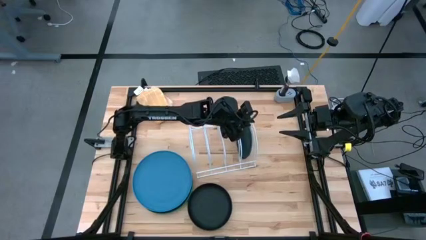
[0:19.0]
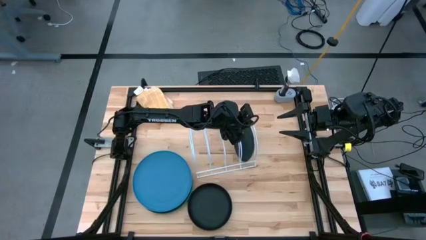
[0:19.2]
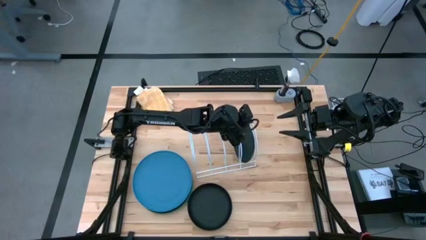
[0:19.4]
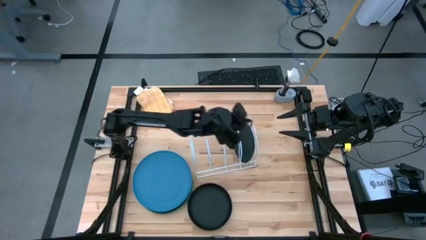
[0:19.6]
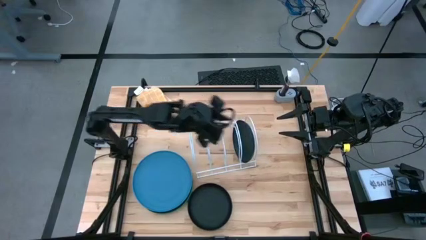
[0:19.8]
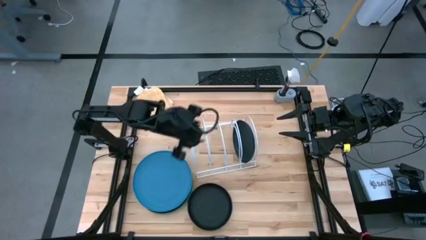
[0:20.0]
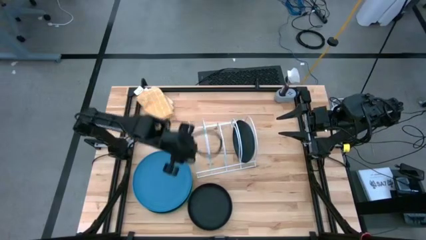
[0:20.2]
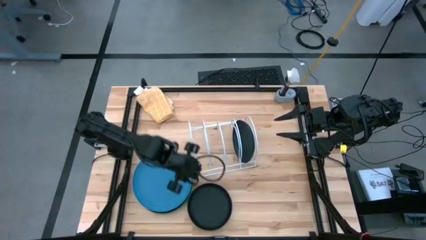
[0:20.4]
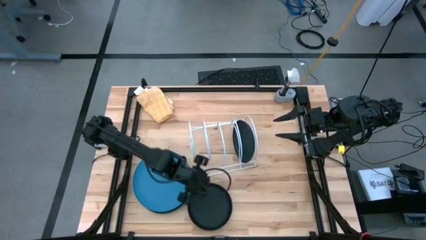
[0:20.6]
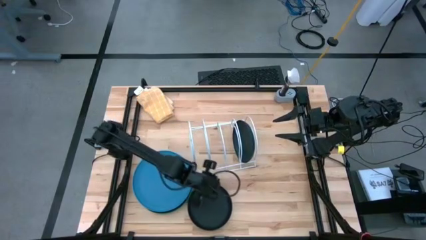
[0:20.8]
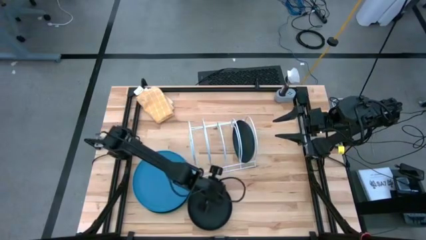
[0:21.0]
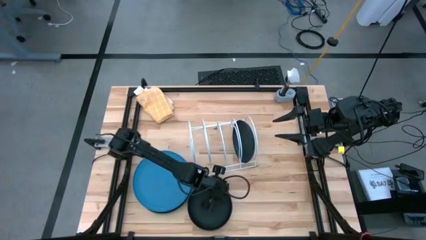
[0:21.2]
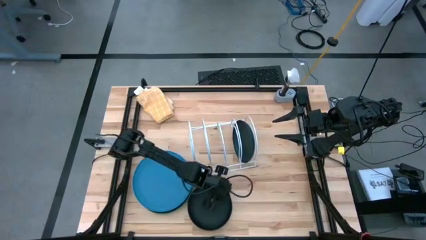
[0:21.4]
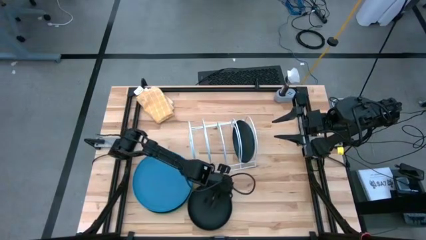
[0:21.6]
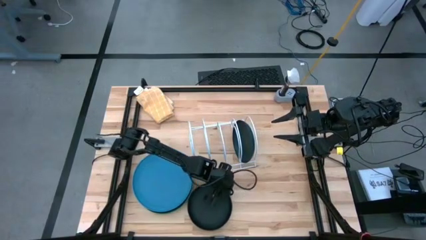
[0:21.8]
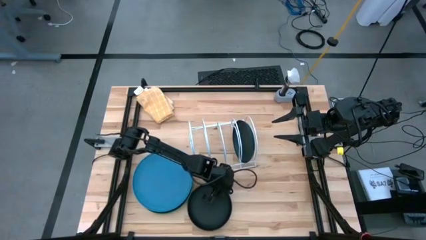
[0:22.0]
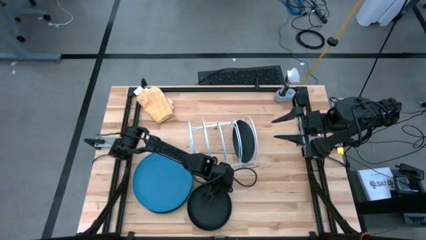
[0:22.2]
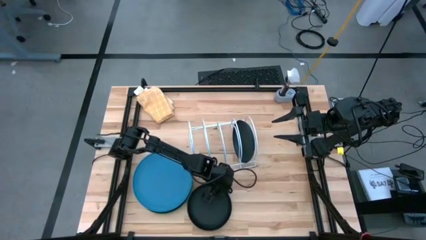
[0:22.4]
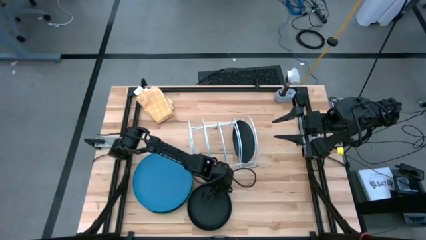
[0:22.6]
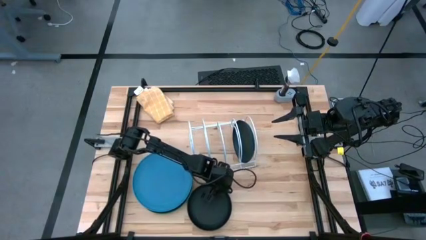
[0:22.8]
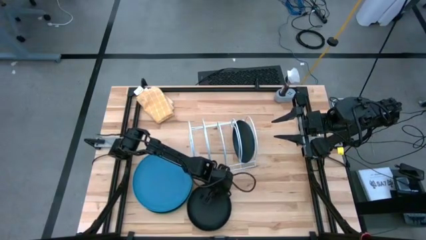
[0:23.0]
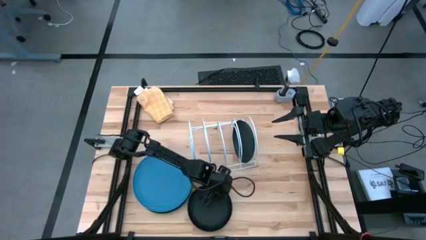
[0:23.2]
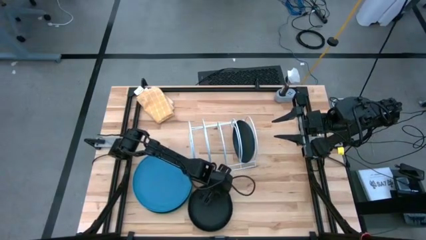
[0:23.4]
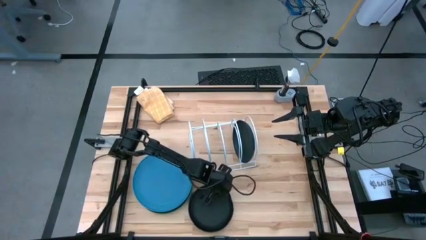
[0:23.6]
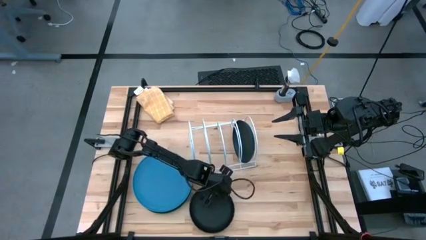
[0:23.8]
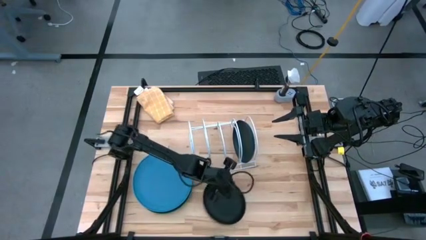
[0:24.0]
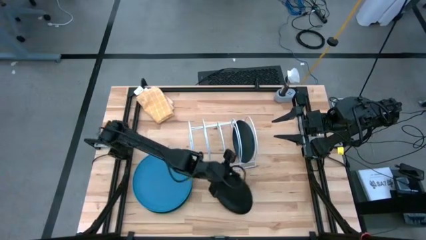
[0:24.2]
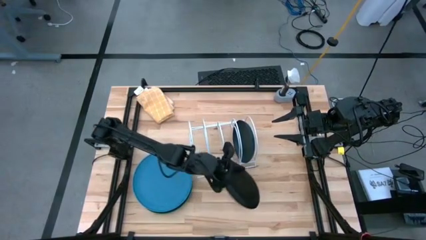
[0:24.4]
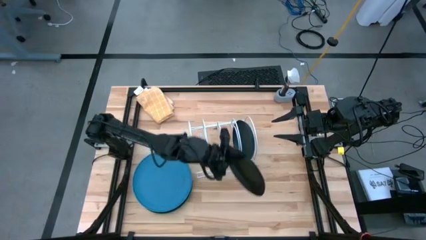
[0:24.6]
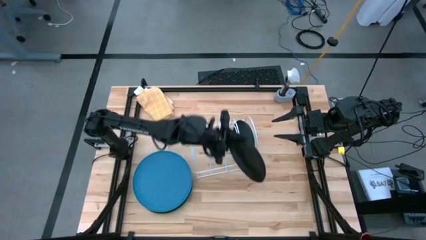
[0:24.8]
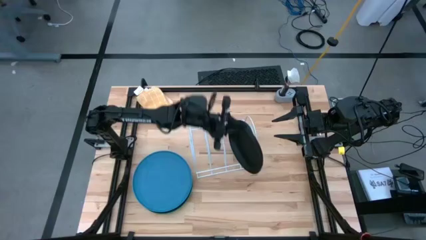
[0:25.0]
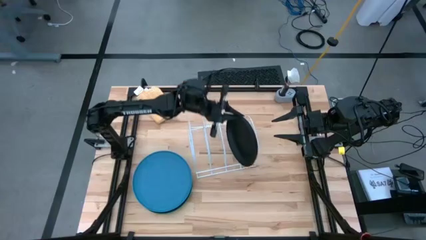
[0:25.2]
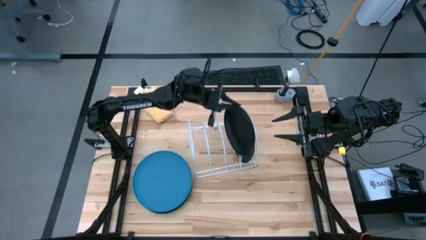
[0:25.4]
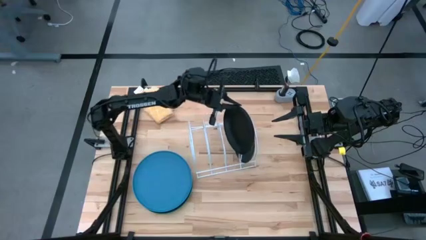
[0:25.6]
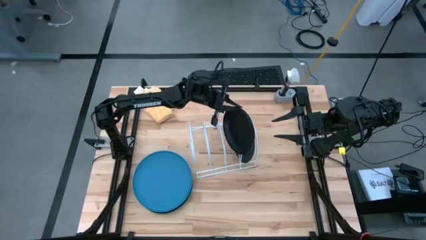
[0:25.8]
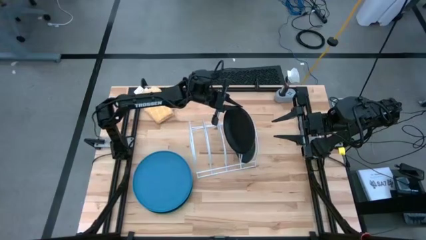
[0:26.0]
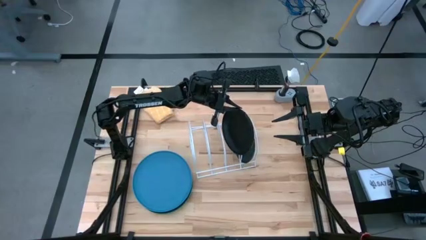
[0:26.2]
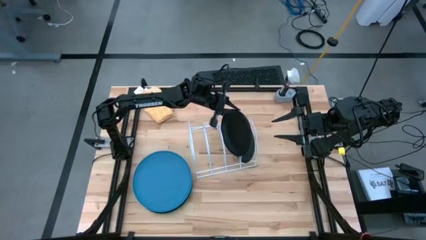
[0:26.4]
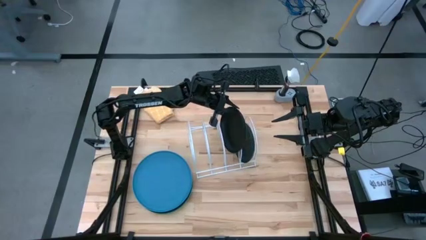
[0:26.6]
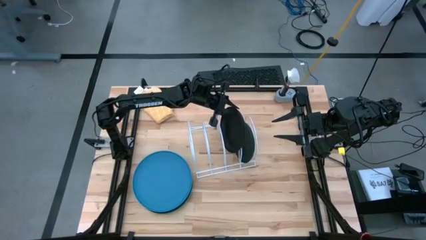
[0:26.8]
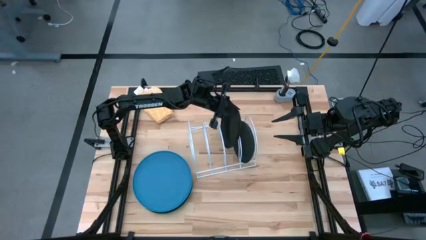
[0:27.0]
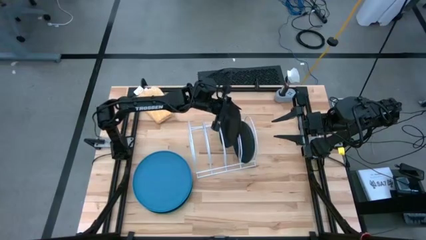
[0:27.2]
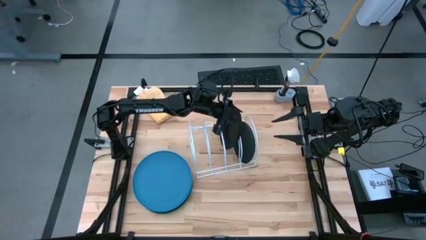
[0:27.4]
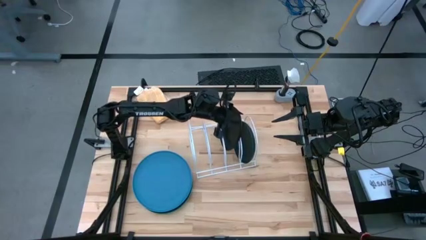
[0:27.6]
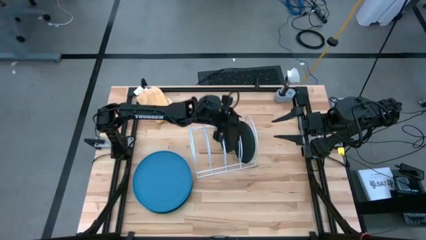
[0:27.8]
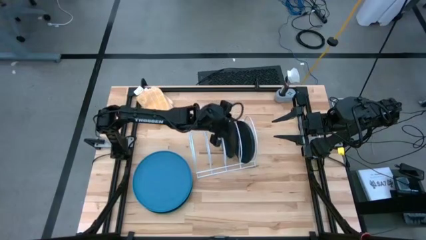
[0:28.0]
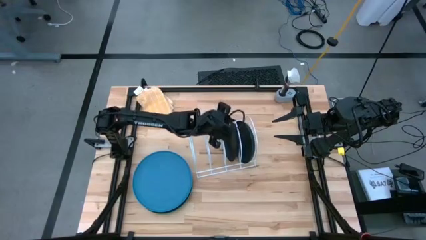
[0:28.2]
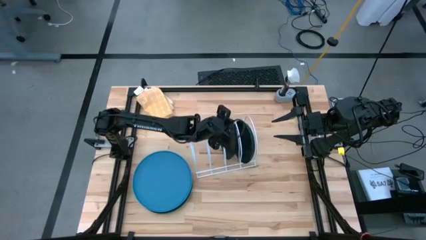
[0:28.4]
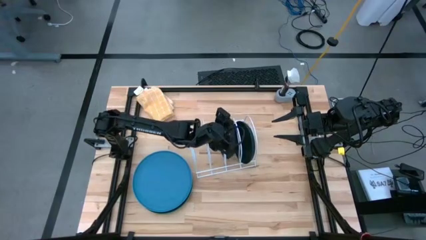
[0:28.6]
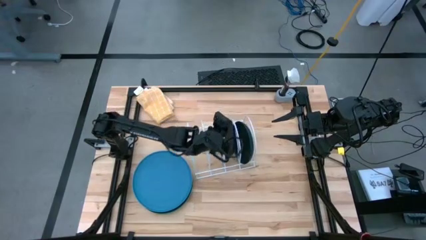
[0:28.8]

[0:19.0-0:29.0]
Task: Sort dishes
Put the black plate into the dish rack

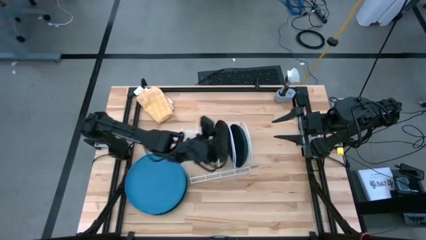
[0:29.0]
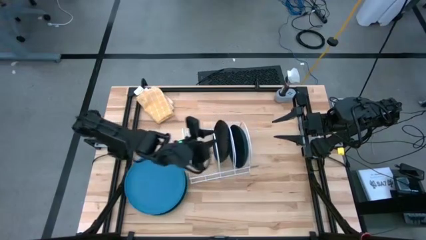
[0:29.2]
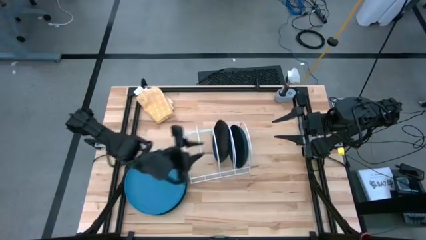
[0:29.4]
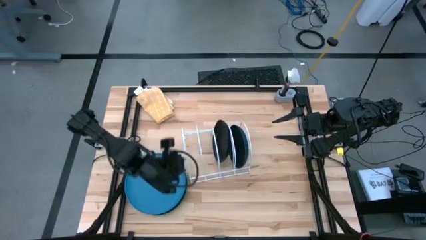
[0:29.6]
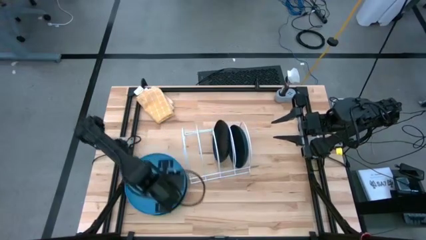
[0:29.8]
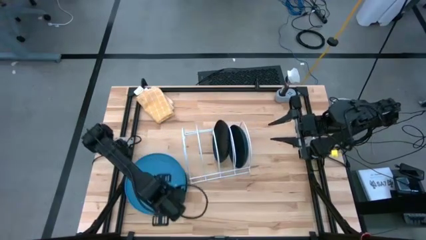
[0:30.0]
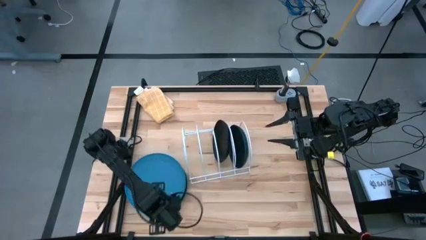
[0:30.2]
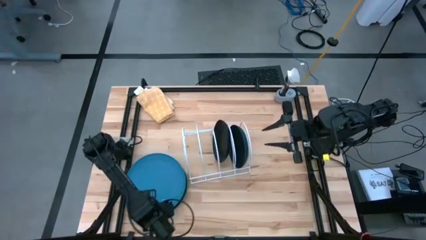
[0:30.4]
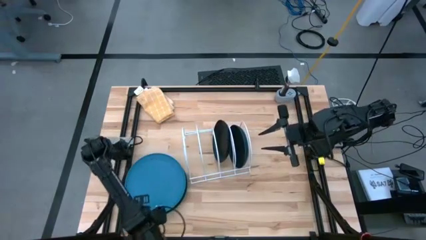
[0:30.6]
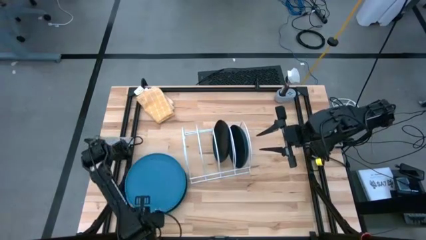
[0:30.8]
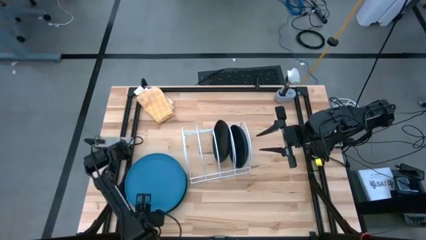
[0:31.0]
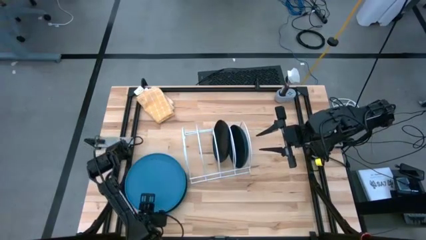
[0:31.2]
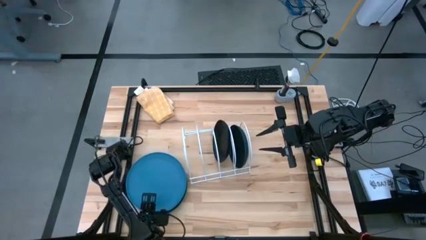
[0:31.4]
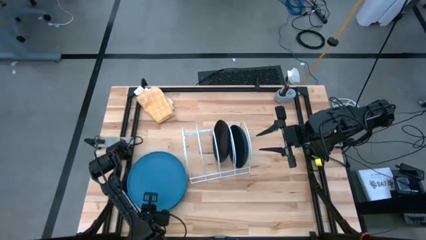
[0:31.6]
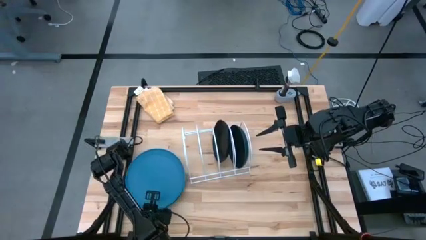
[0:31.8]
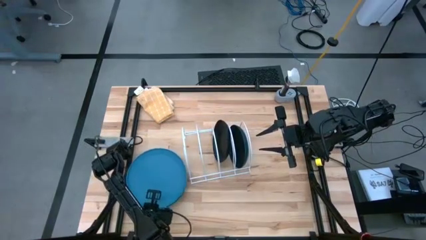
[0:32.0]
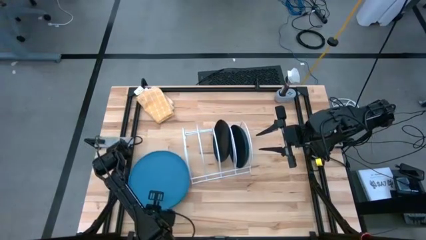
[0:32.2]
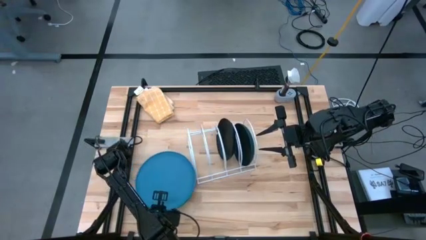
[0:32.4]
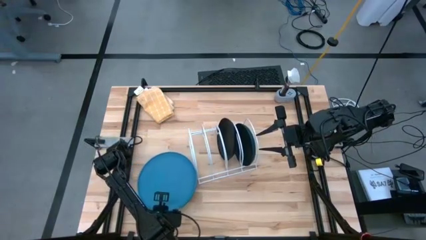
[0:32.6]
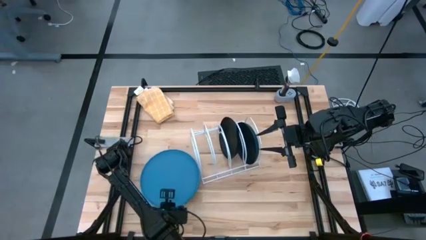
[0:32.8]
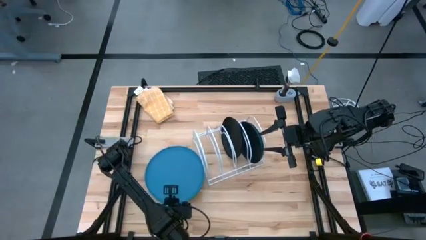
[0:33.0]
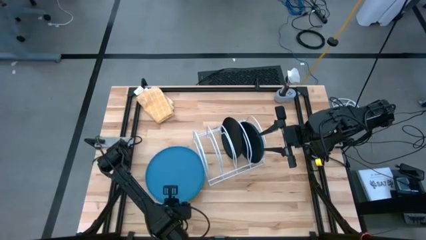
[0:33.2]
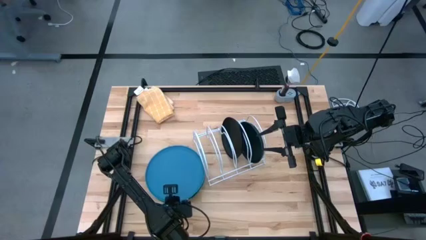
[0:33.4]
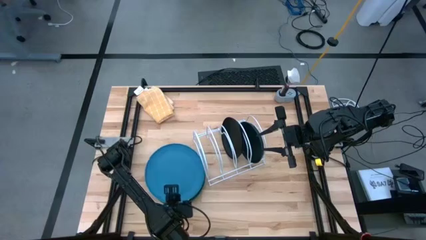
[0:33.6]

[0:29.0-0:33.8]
Put the blue plate into the dish rack

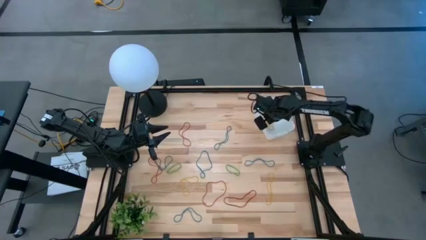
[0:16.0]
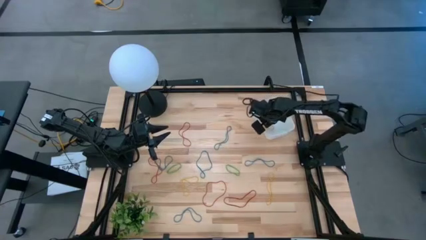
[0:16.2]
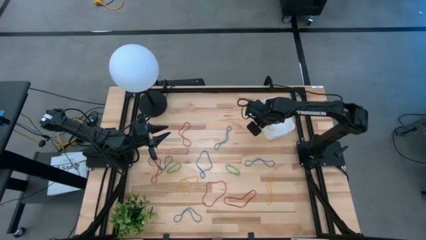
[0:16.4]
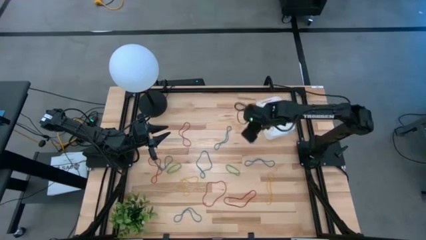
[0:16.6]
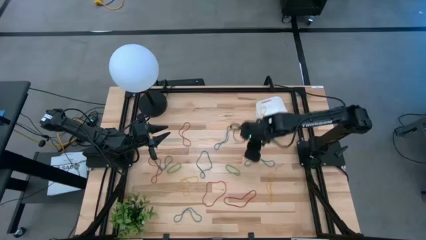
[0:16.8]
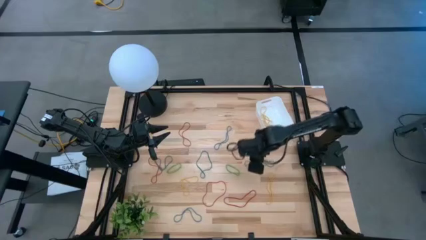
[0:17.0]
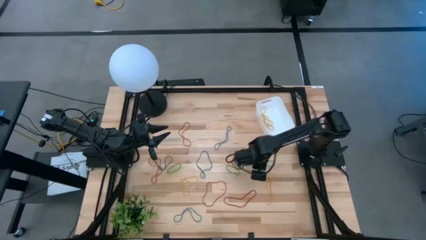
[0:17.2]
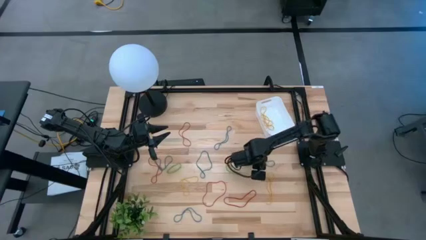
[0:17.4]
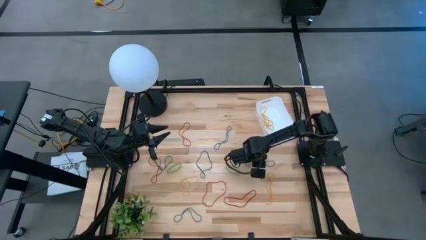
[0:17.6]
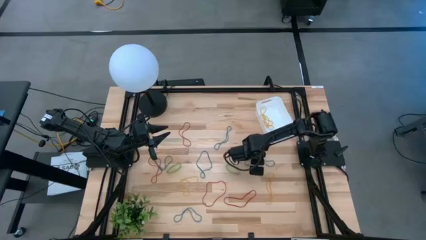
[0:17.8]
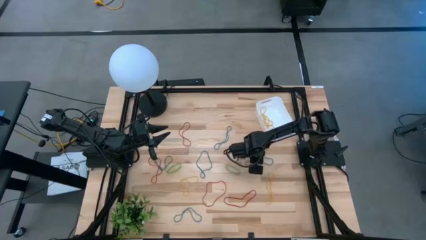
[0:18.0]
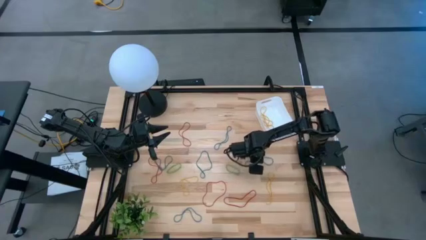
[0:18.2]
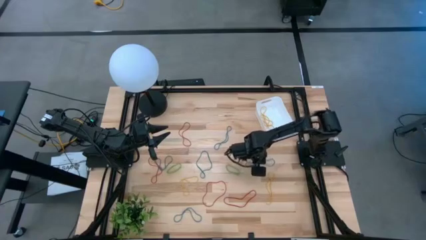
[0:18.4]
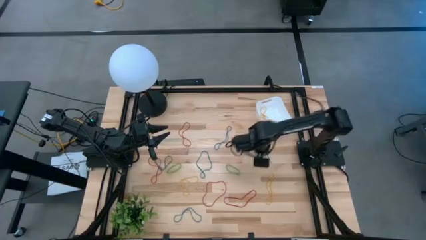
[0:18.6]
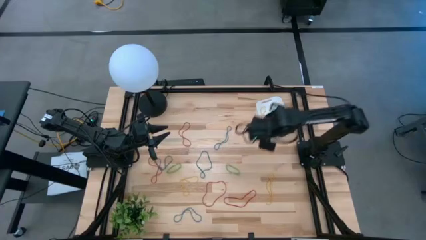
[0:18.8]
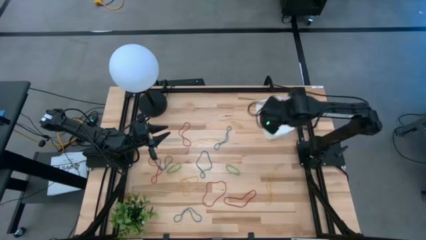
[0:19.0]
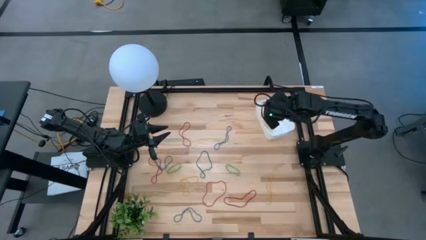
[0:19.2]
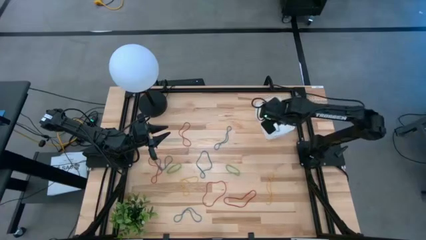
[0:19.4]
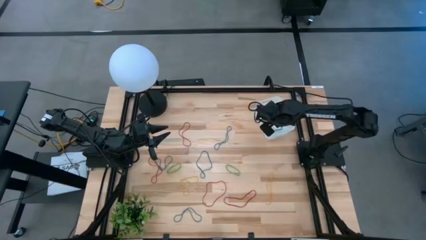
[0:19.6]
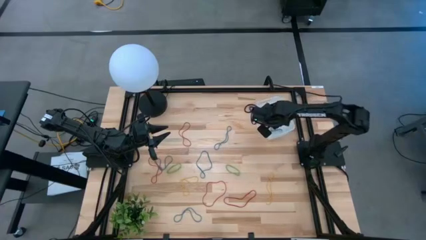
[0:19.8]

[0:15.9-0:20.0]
Task: Pick and place items into bin
Put the blue rubber band into the white bin
